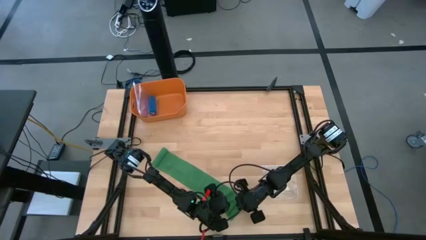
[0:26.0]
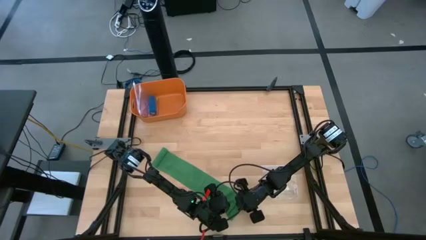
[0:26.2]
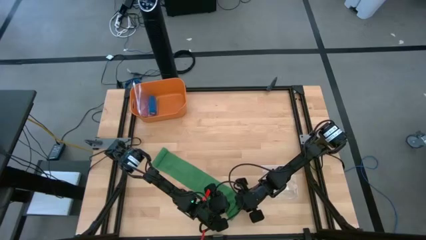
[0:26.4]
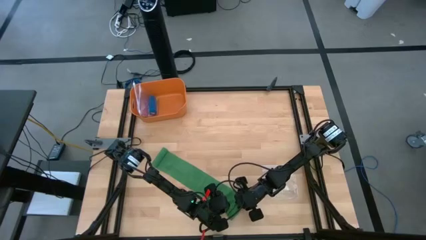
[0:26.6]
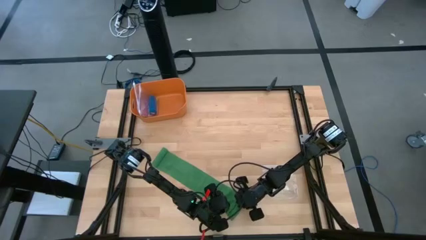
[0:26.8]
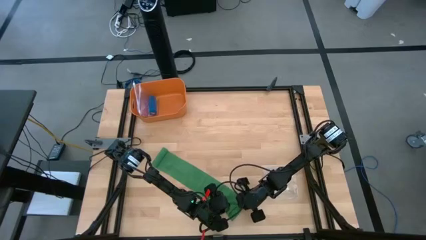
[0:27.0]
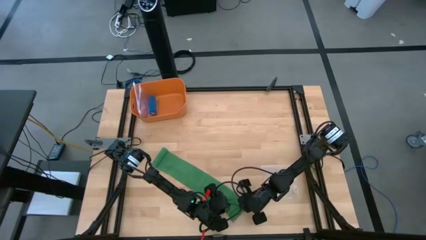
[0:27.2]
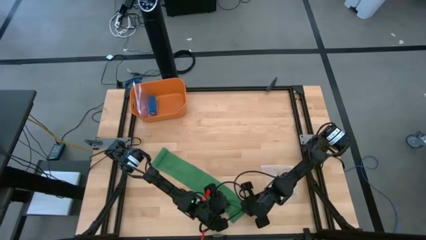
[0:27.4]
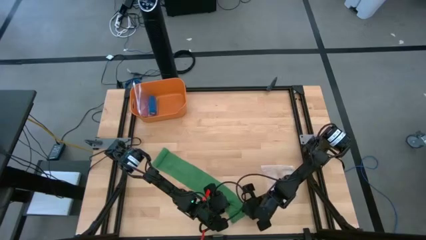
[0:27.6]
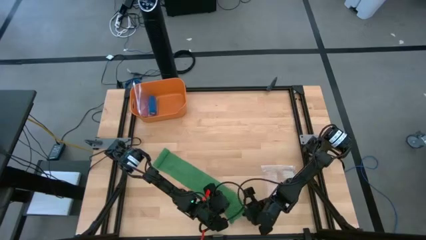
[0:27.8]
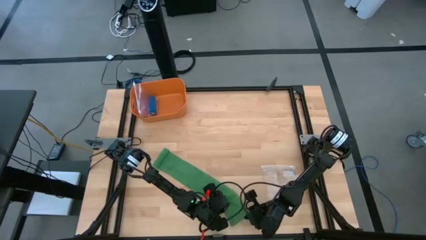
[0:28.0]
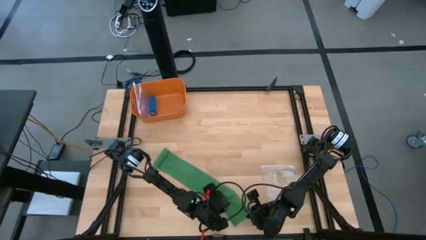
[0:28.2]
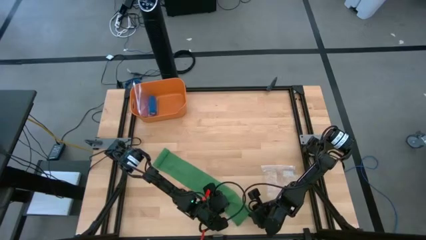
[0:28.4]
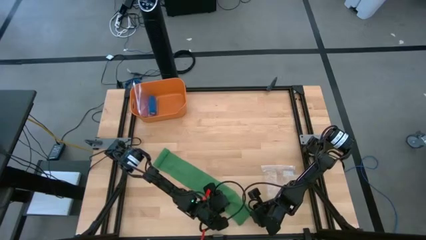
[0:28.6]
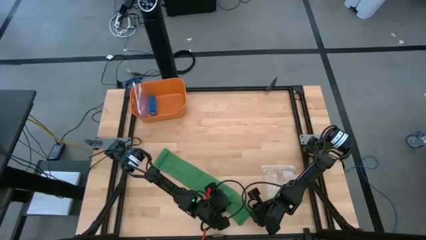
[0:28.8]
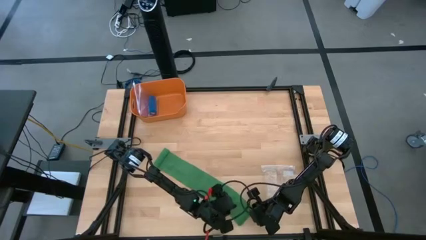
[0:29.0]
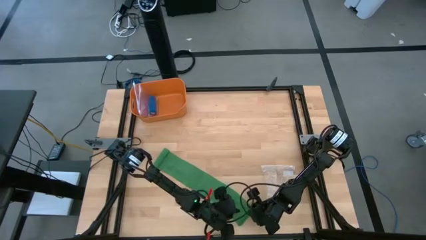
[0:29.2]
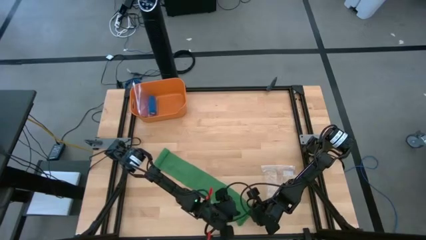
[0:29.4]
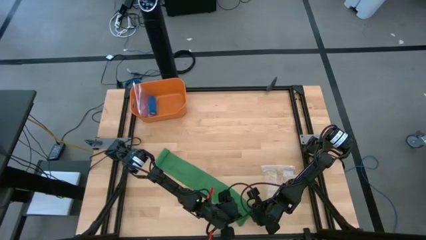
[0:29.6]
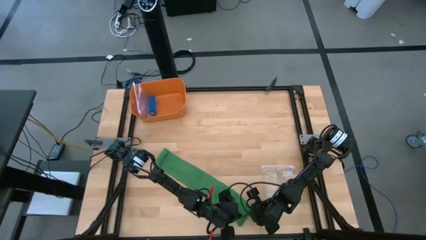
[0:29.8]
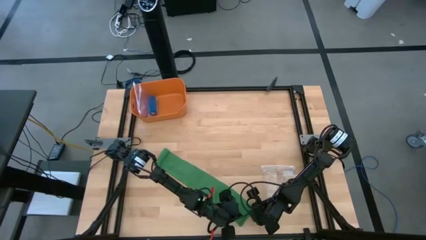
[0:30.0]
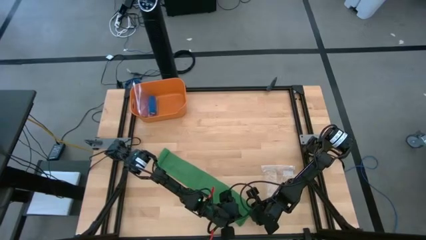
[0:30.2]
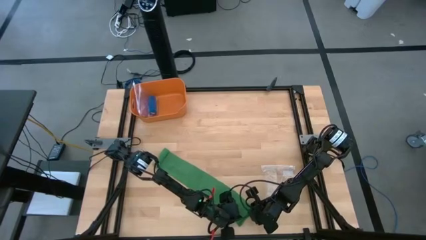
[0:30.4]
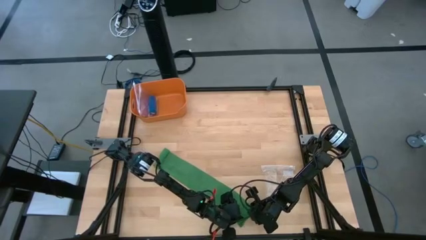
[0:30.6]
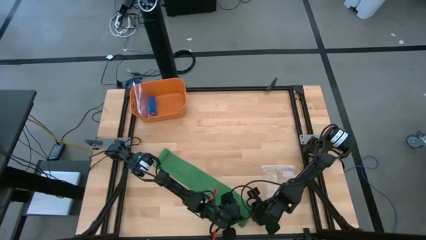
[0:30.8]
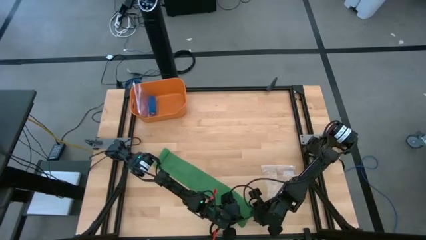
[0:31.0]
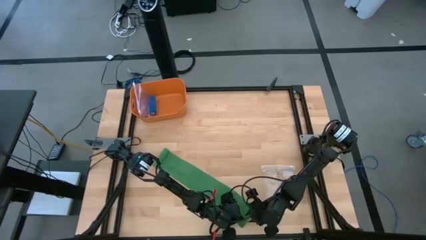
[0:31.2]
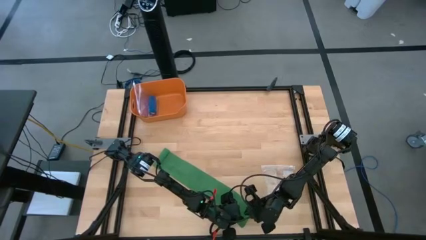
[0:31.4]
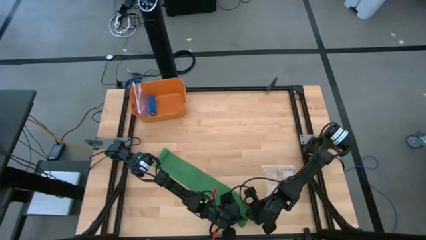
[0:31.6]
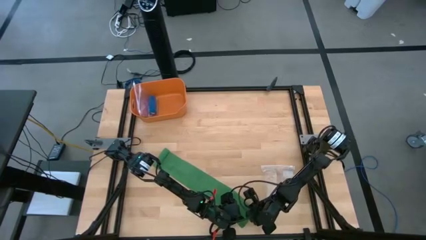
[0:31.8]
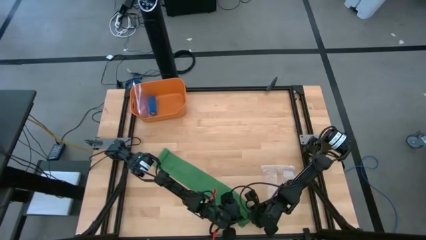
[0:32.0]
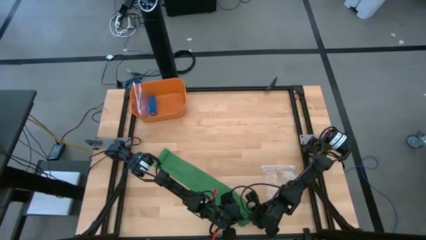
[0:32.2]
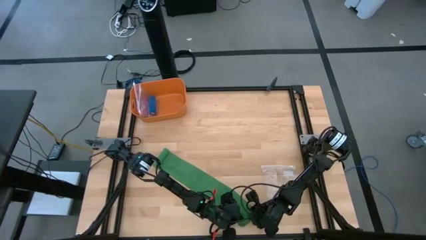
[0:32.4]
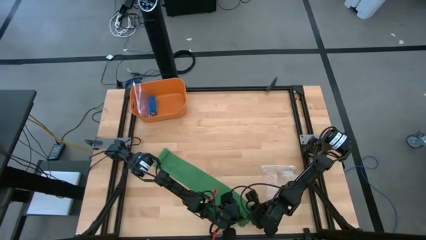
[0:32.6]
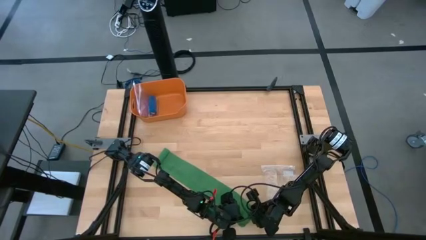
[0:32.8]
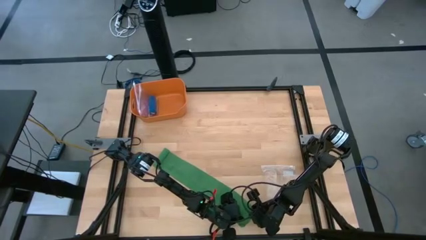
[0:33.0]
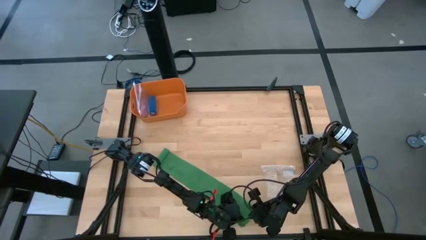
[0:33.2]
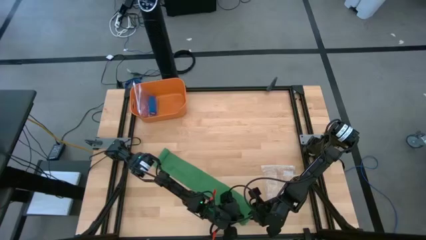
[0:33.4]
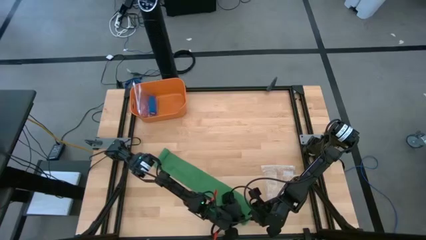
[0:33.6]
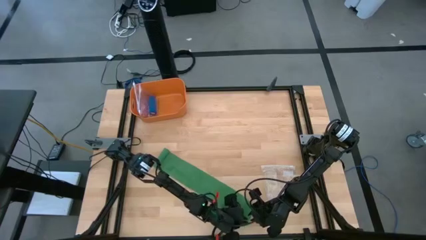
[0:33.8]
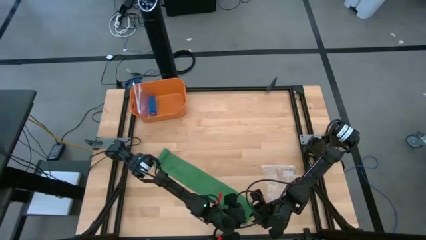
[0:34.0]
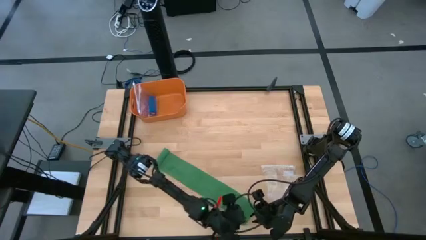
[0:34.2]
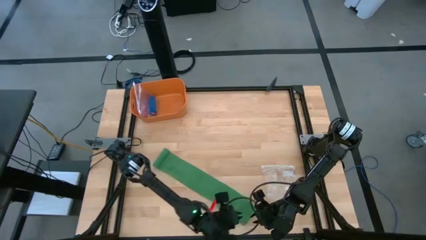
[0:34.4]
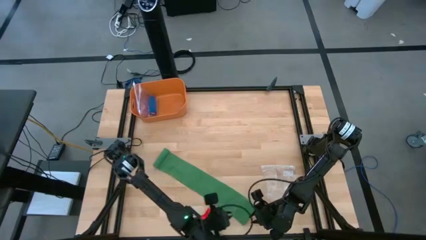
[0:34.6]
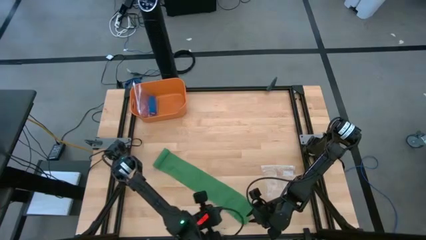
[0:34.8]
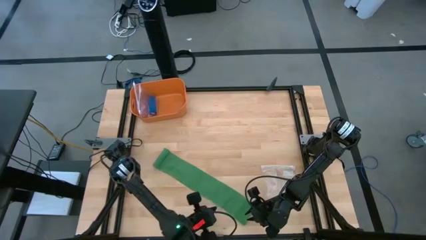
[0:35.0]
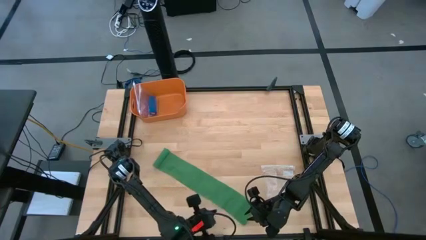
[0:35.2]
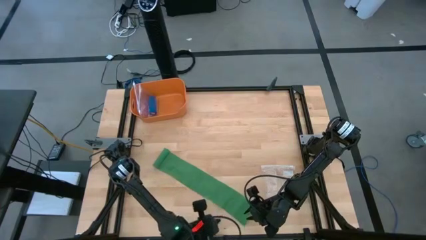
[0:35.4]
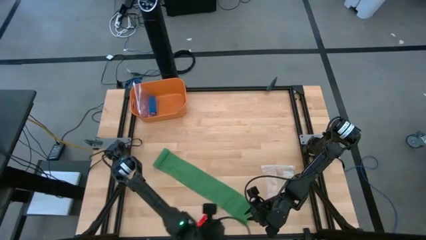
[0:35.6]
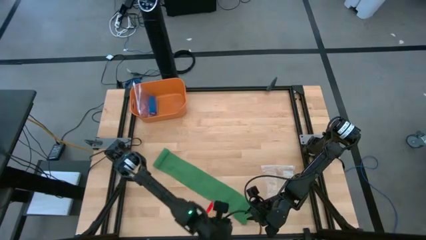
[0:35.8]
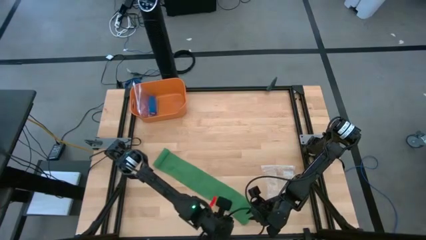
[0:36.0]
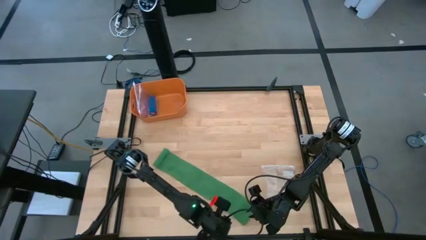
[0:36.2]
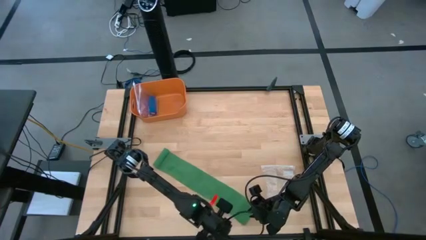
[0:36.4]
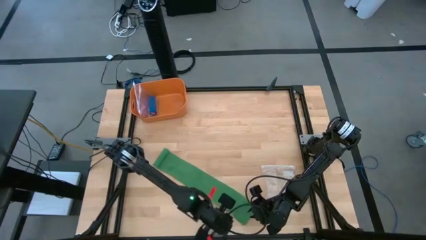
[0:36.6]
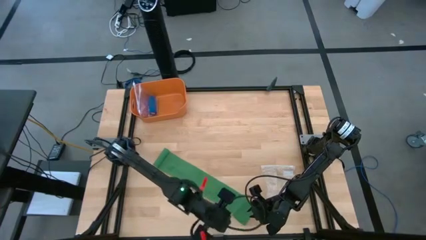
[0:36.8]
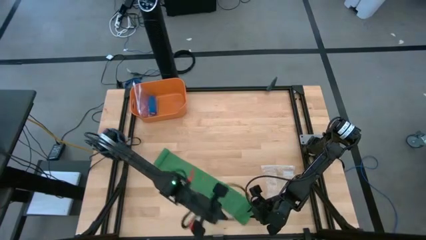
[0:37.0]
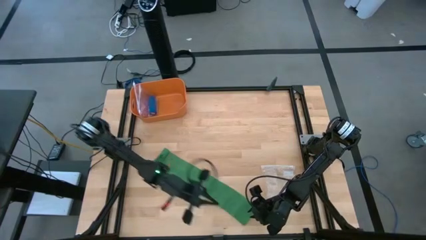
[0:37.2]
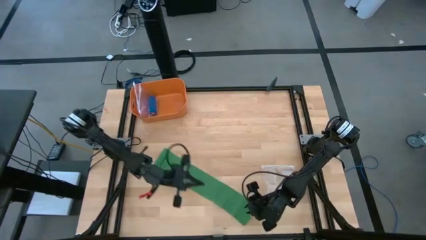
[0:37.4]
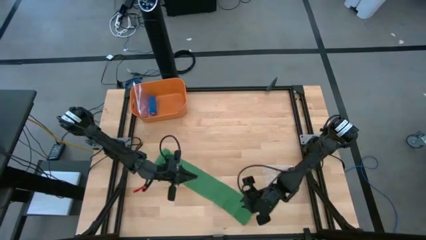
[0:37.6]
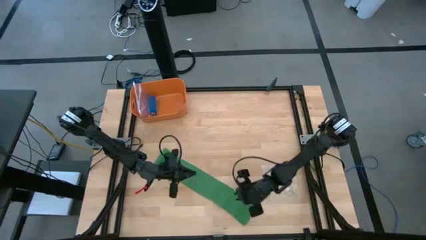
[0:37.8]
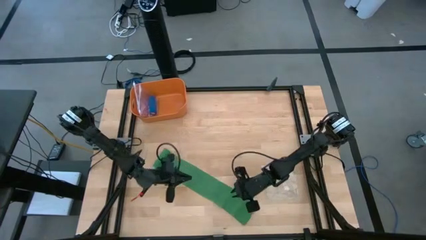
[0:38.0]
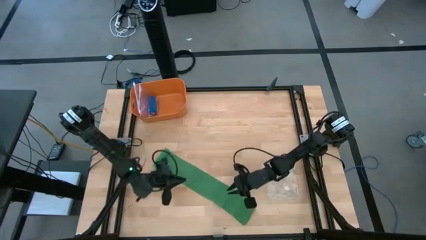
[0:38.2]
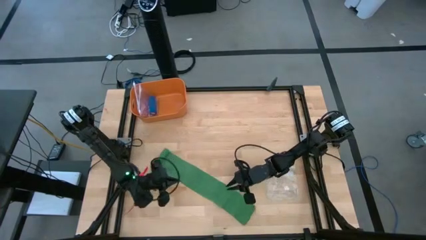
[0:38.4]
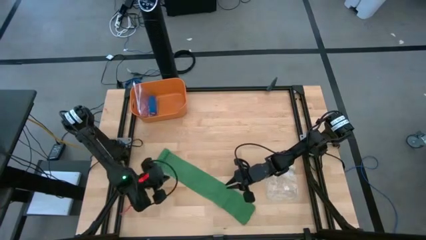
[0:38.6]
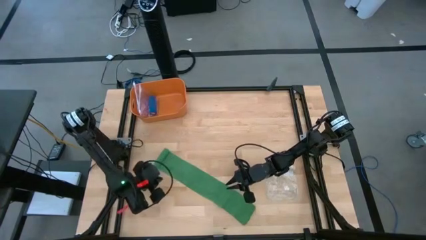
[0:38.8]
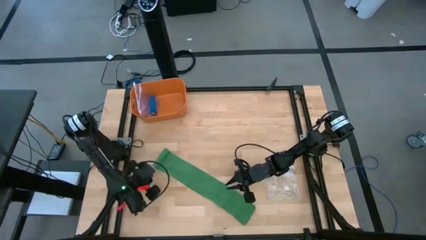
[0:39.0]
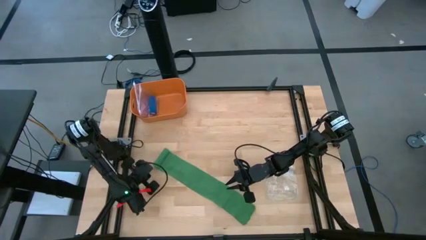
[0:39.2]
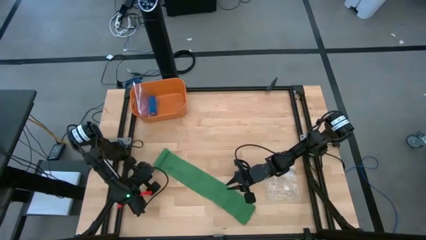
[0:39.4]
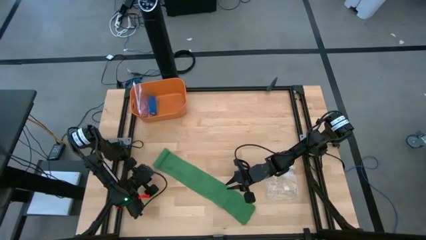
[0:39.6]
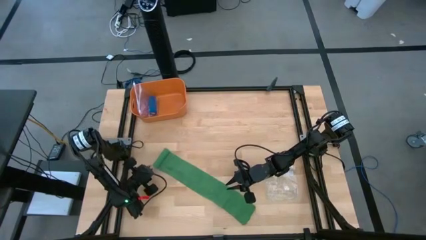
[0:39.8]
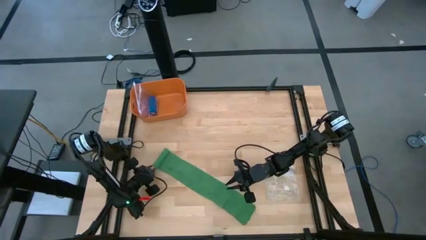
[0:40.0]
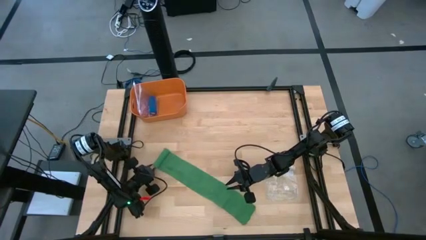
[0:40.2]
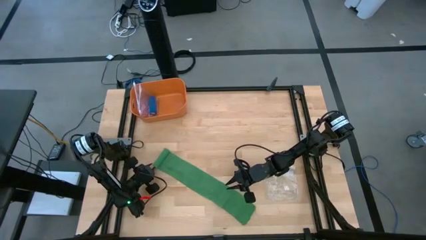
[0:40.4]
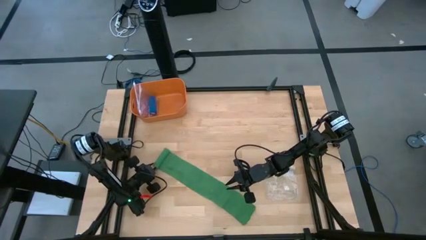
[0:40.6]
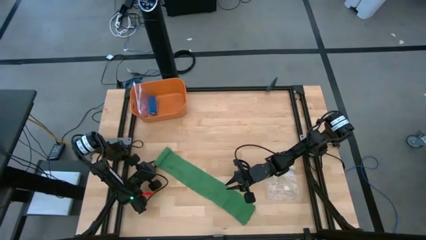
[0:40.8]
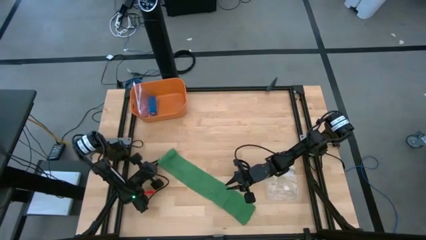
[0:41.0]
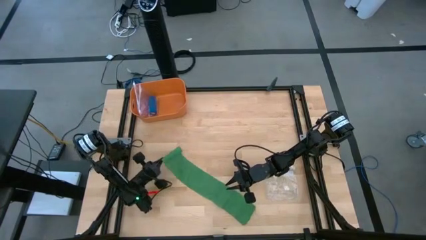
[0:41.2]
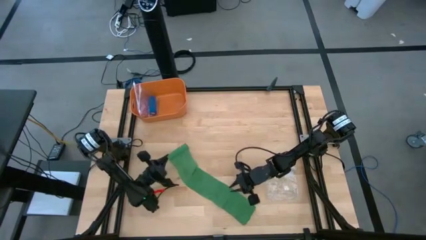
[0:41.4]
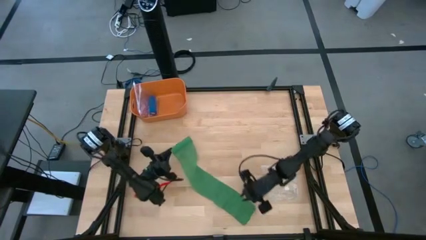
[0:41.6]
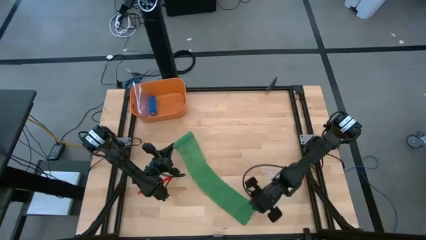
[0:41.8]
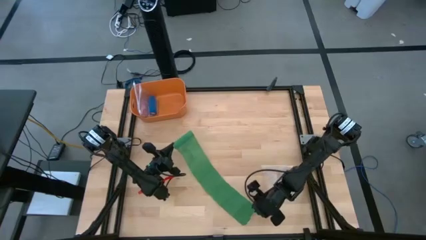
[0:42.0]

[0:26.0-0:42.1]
Task: Roll bandage
Roll the green bandage

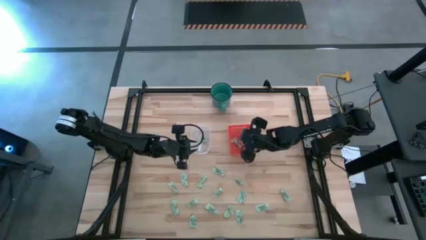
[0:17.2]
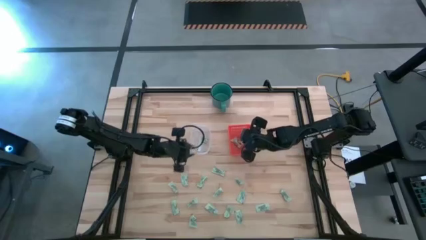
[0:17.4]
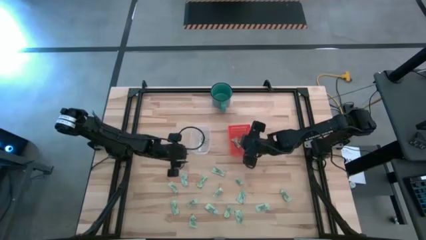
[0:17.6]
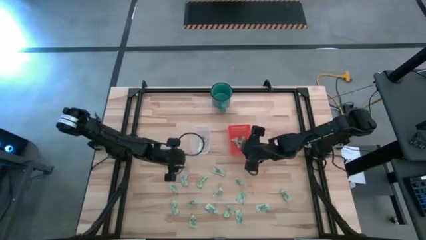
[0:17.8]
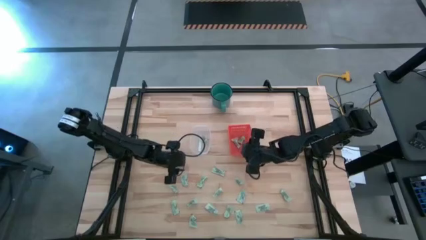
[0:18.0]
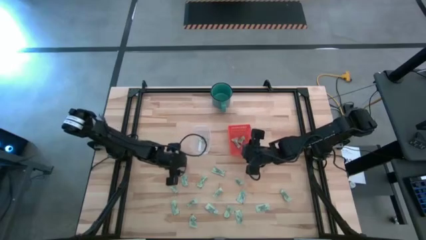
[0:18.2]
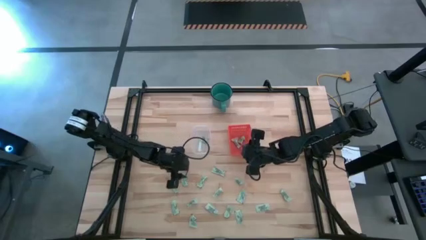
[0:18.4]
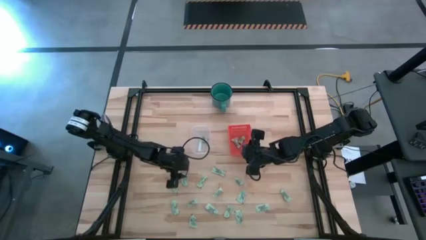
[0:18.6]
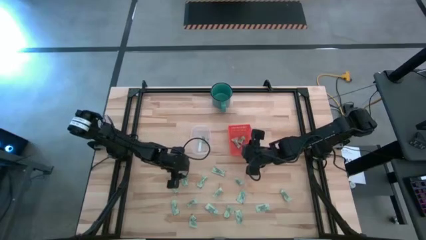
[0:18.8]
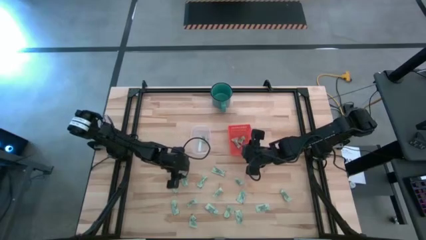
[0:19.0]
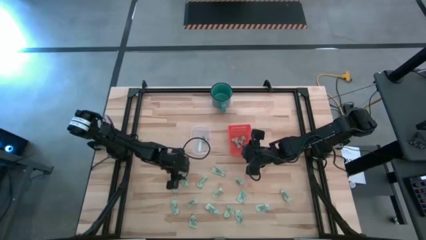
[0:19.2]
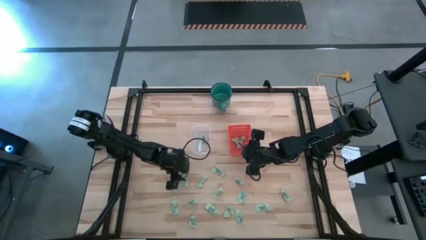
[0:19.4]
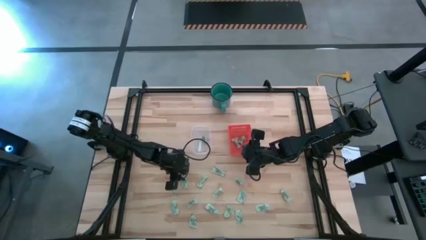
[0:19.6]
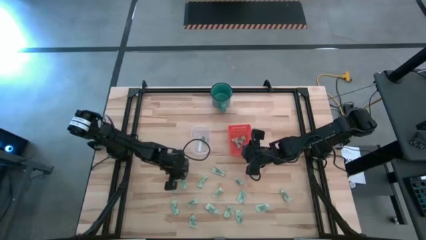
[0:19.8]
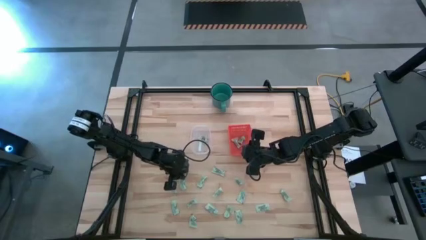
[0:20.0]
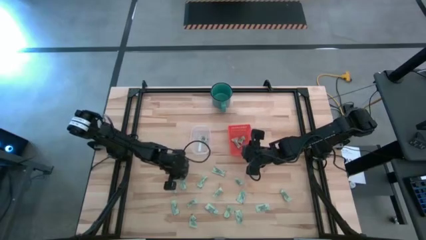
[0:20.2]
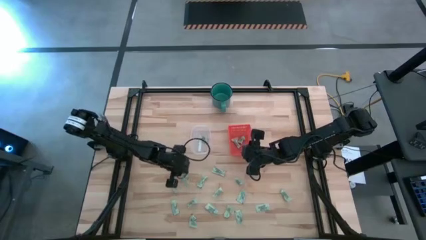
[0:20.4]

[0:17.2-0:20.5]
Task: Pick and place items into bin
Put the stevia packet into the transparent bin
